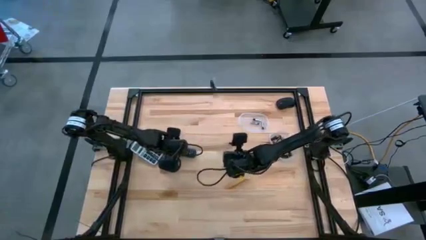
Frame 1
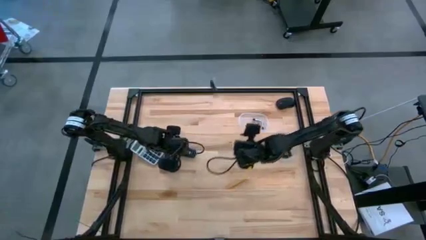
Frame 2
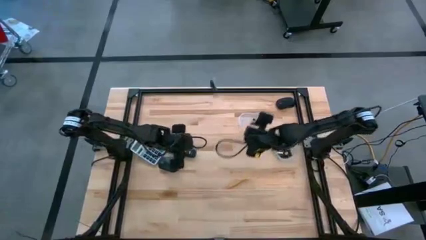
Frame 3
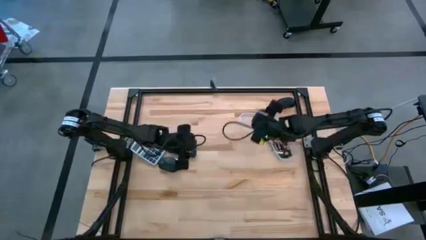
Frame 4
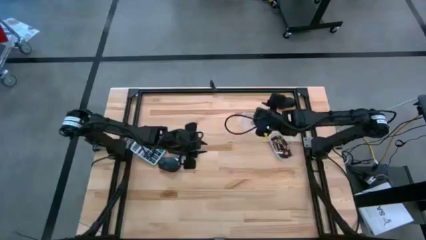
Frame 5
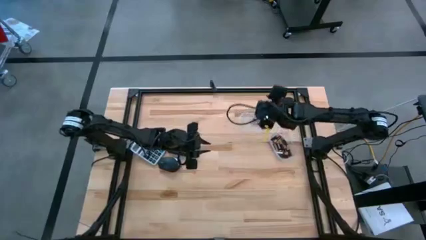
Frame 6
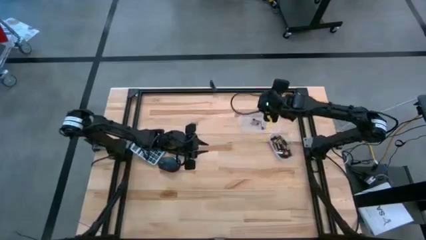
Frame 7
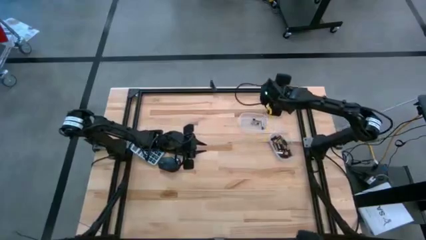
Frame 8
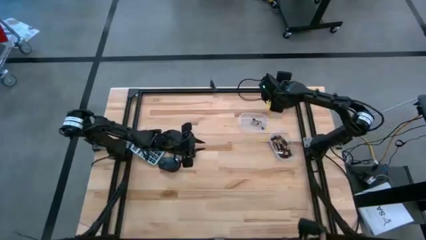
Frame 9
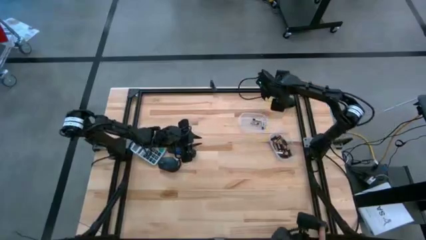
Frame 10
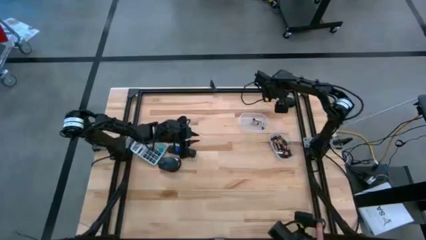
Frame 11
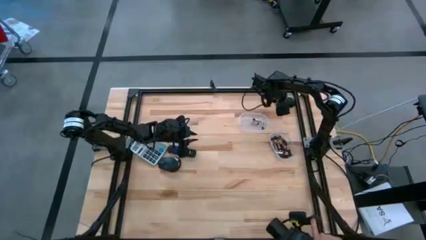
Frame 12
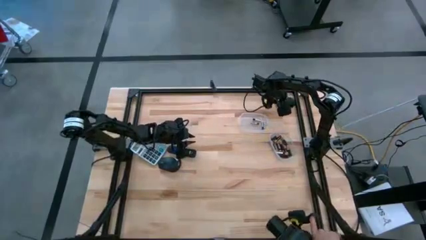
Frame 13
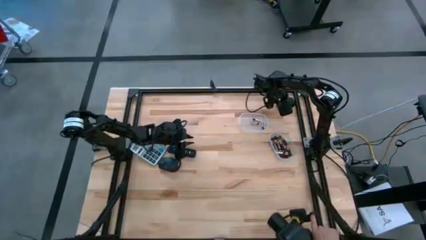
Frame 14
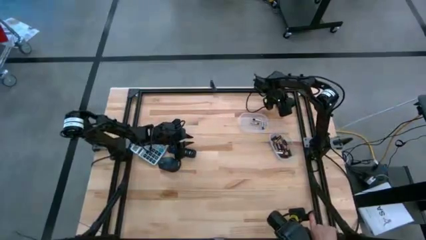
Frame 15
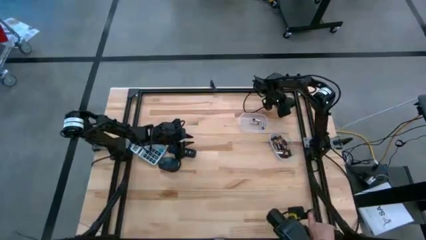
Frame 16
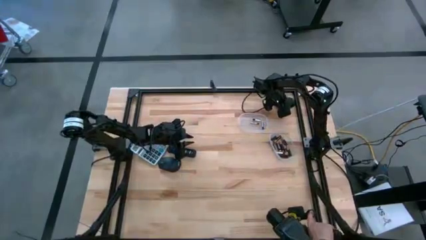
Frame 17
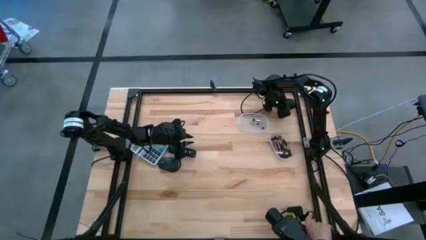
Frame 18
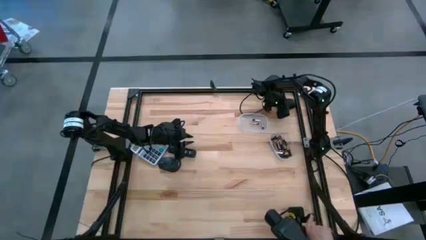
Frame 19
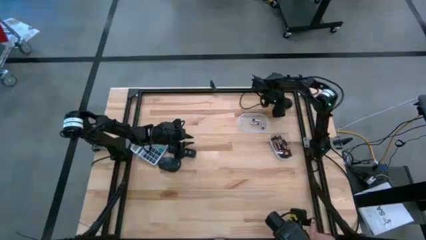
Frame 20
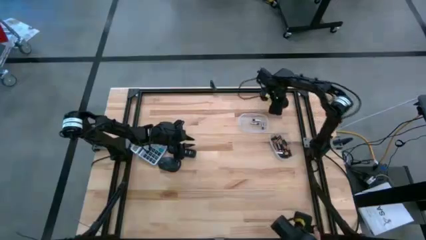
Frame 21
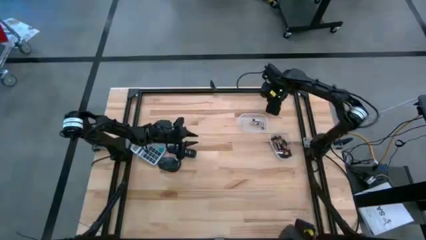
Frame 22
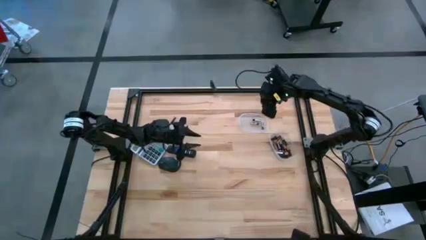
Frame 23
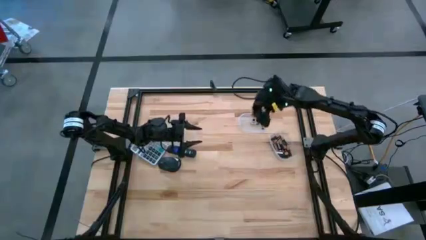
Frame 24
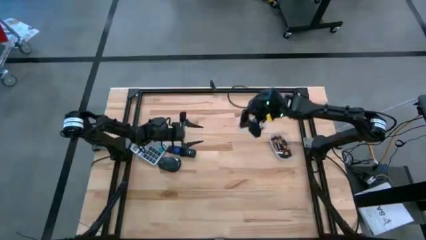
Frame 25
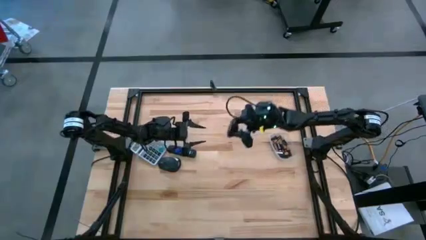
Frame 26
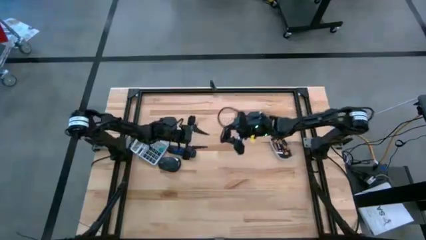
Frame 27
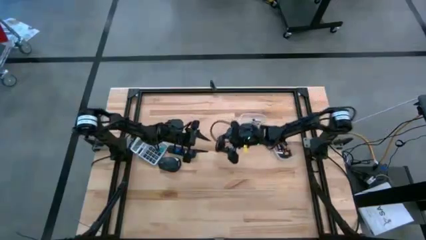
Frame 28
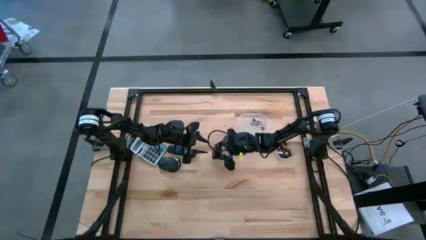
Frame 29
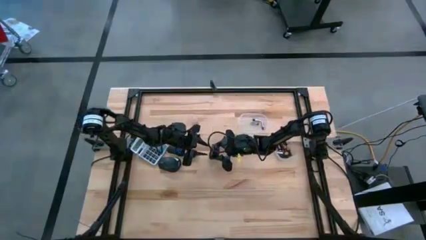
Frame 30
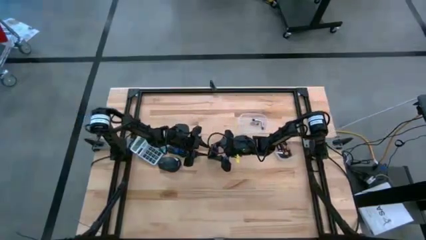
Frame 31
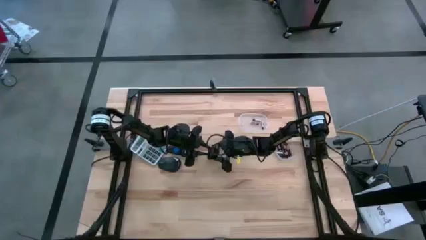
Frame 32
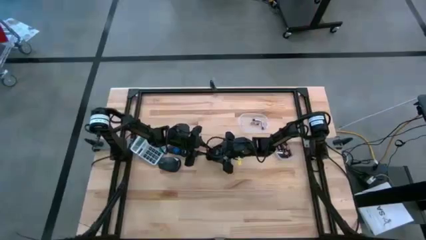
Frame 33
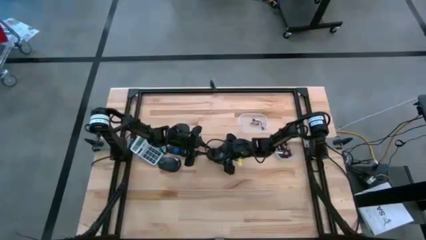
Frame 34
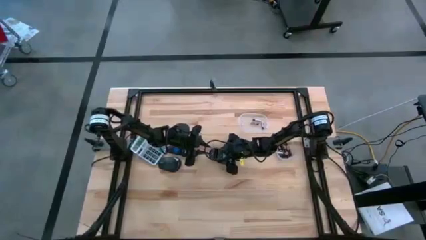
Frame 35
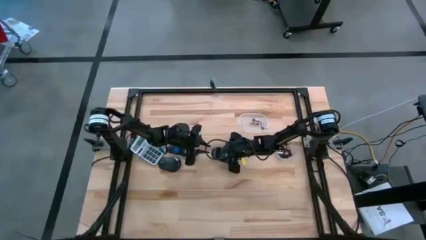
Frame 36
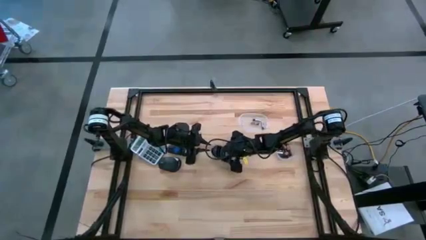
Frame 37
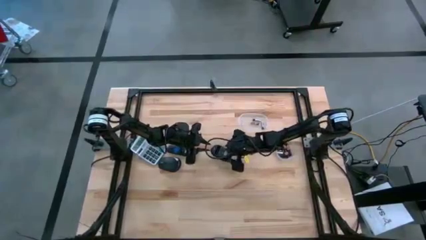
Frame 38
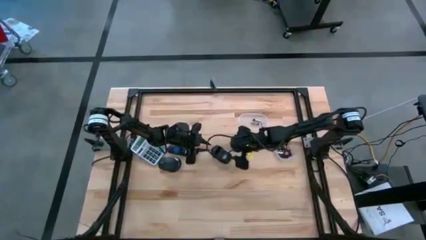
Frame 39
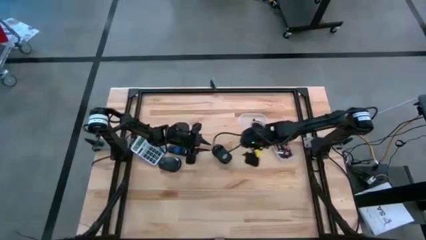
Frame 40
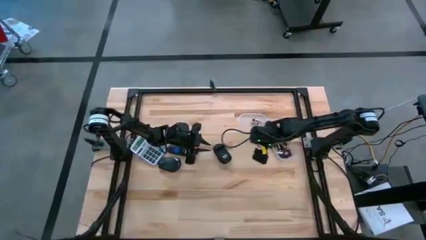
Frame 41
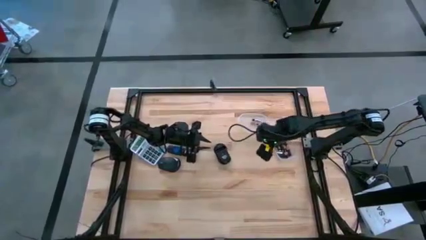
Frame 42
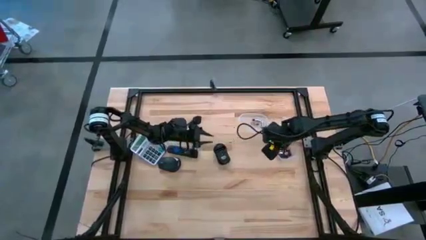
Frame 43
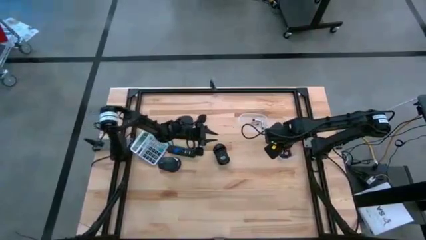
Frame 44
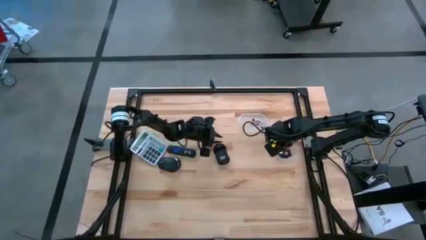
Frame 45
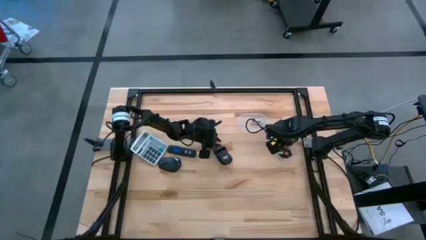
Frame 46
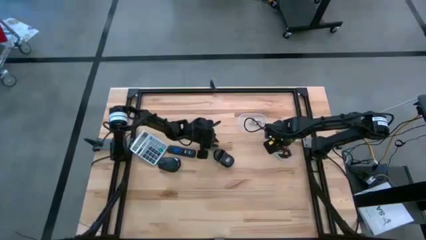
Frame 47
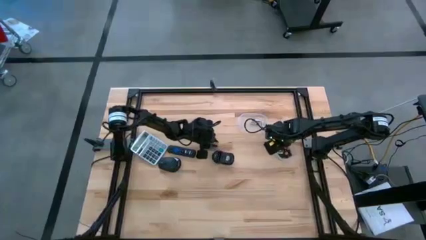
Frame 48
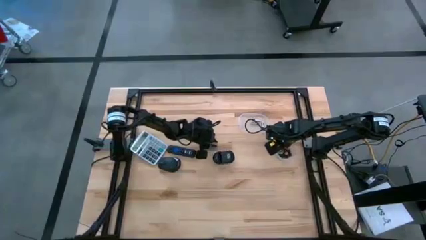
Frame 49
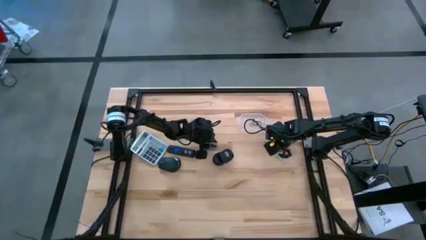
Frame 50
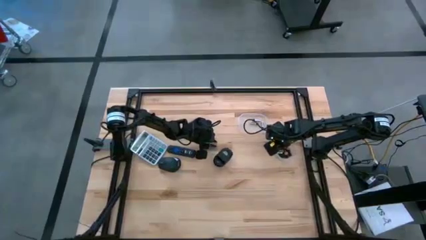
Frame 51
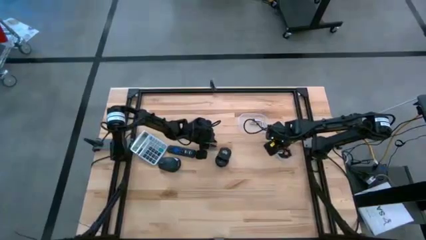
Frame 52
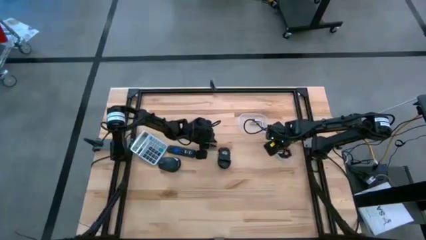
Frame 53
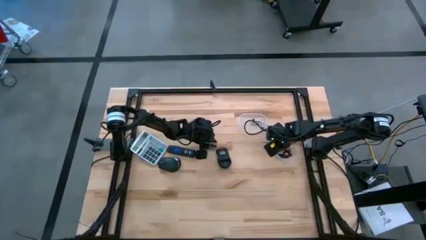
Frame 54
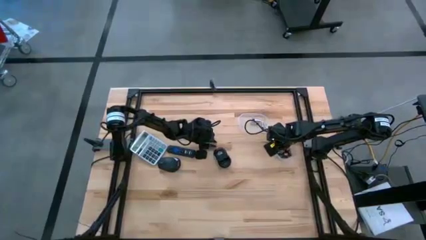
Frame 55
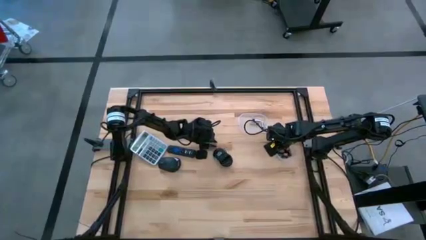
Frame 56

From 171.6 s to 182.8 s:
Task: Insert battery
Insert the brown battery into the black mouse battery compartment

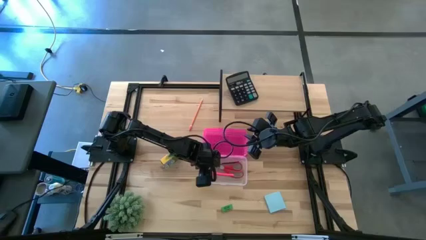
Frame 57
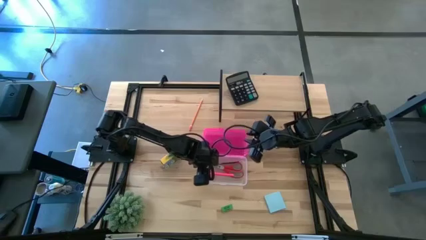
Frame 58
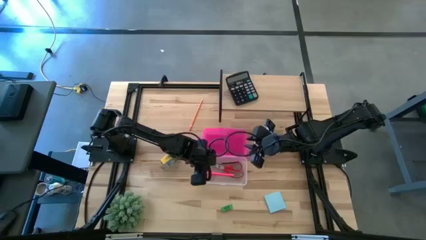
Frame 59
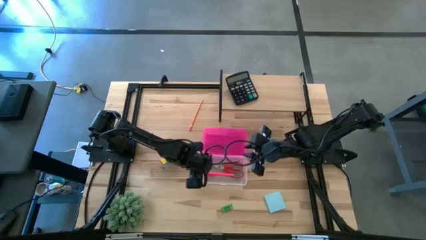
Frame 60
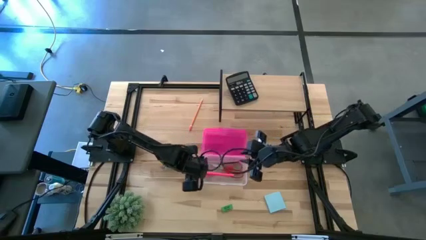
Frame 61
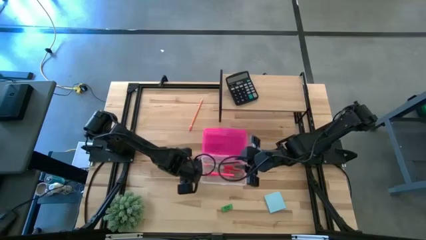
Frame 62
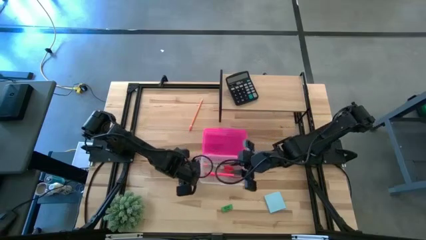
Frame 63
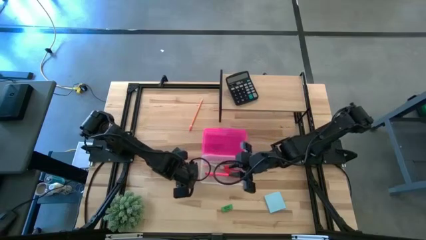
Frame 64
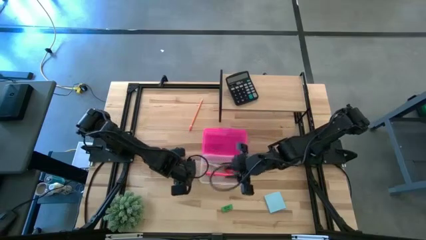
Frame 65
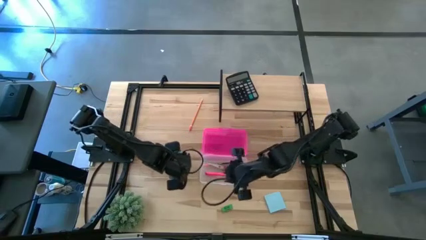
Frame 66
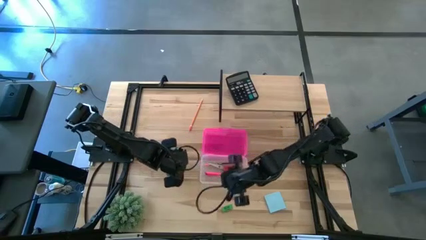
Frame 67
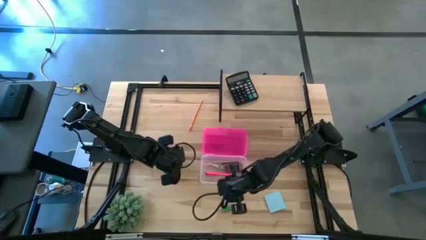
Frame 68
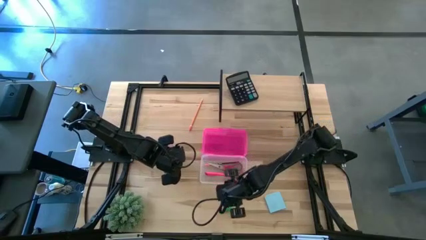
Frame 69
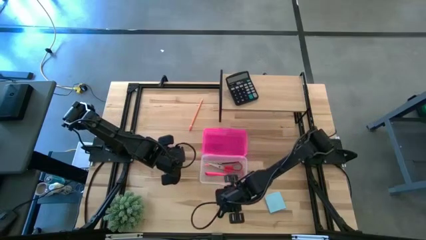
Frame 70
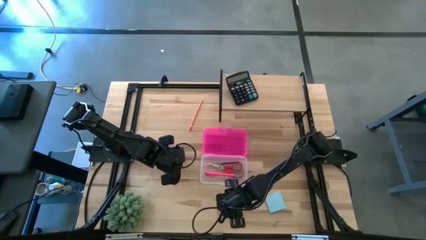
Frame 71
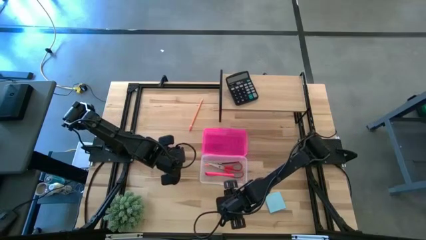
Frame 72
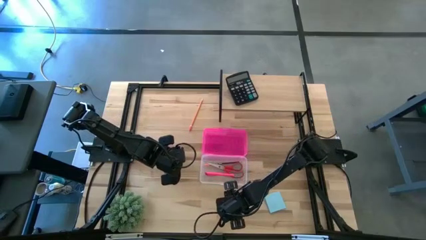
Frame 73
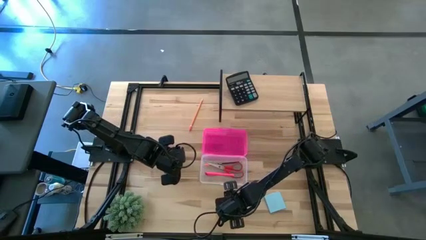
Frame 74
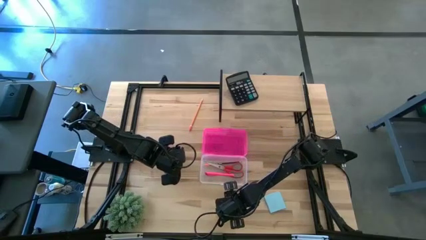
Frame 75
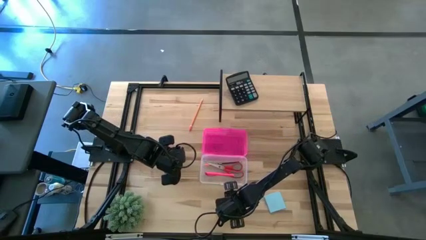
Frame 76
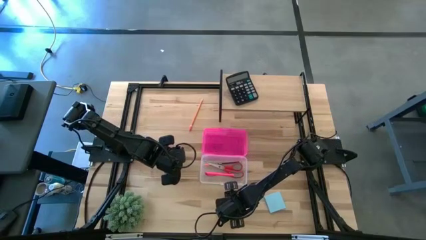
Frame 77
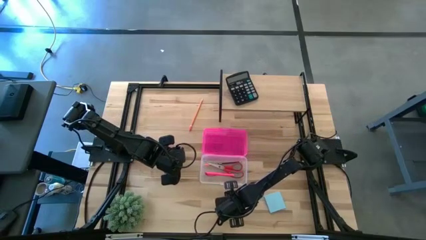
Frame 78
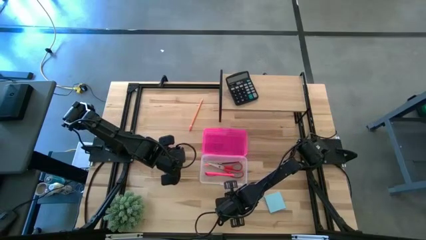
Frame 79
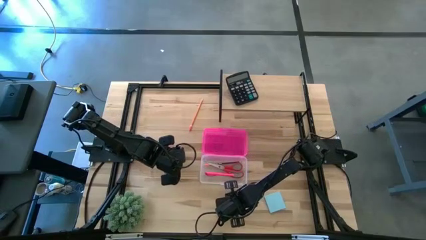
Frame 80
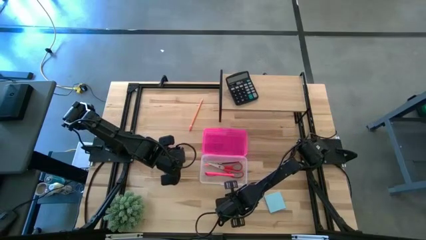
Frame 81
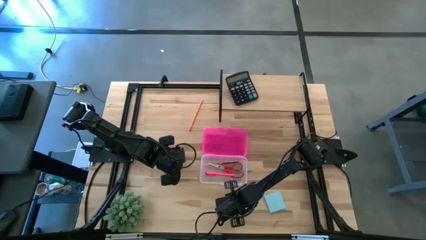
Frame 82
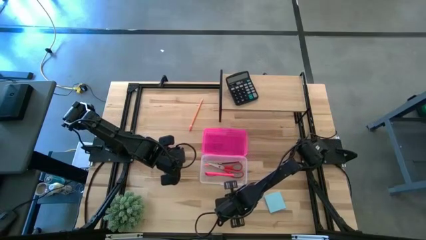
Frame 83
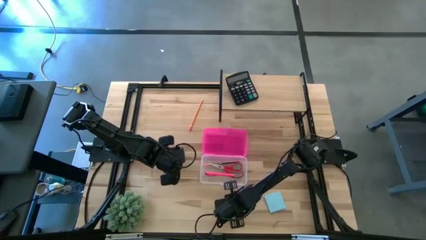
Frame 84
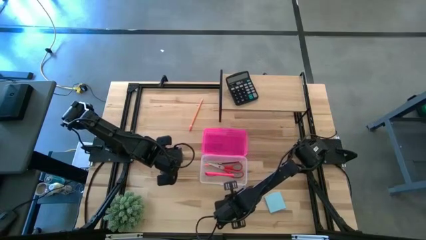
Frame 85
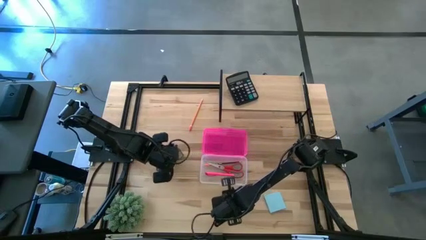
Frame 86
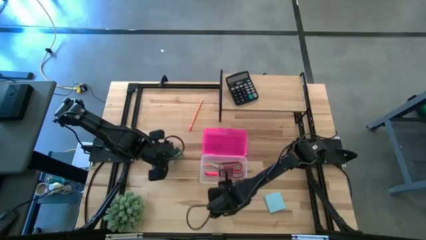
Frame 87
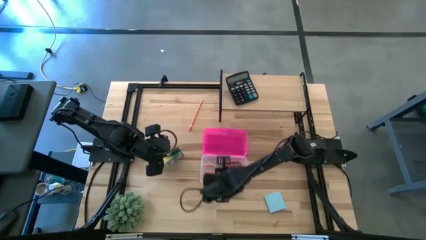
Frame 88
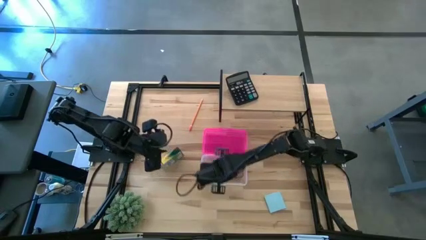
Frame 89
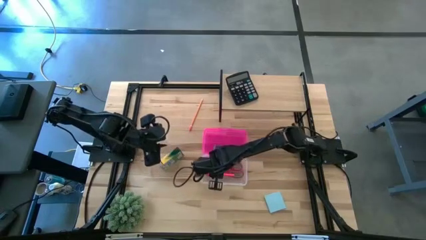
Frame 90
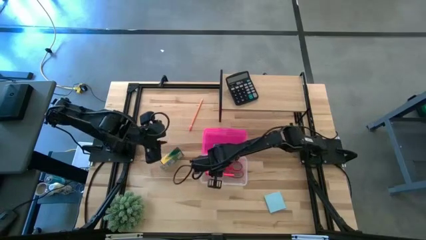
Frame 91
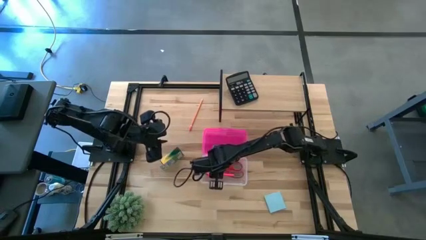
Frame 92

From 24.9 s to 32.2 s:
Task: Pack school essentials
Put the green eraser into the supply box
